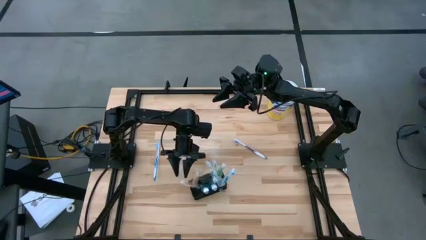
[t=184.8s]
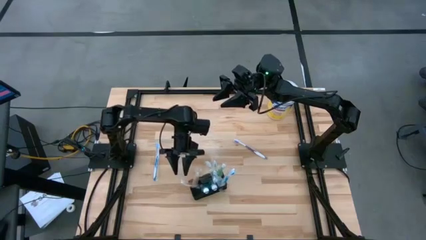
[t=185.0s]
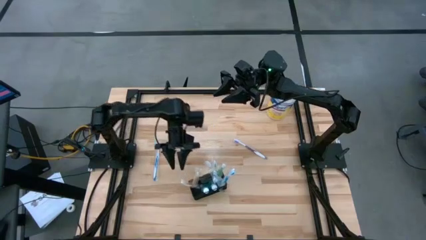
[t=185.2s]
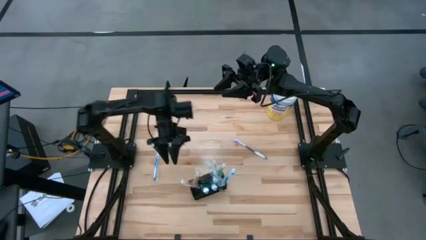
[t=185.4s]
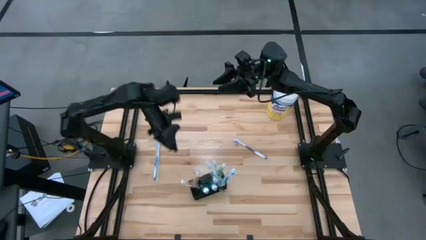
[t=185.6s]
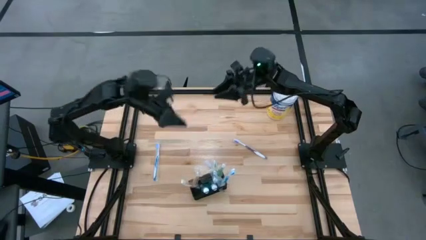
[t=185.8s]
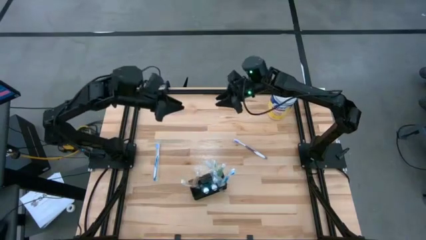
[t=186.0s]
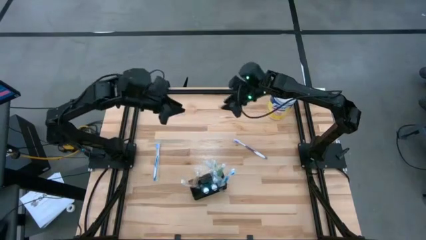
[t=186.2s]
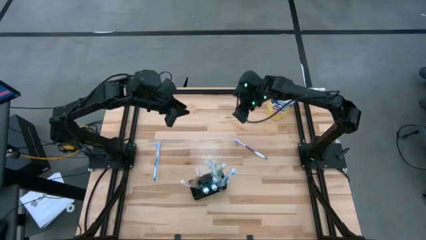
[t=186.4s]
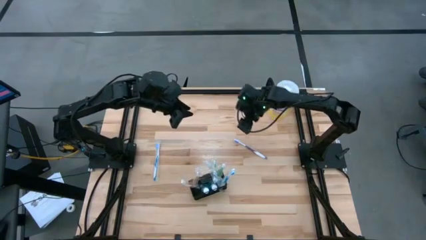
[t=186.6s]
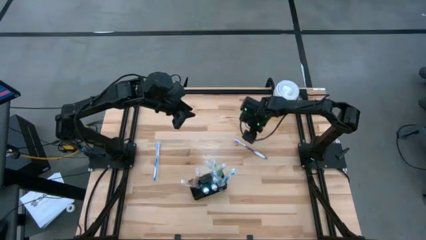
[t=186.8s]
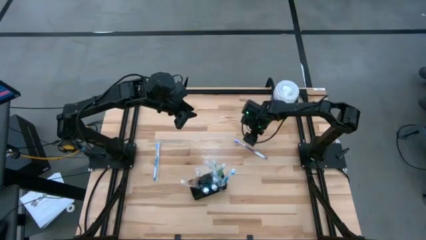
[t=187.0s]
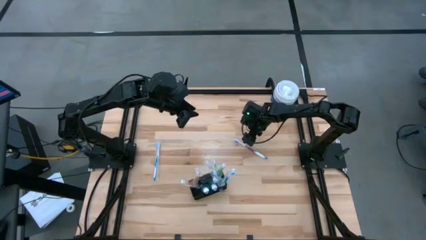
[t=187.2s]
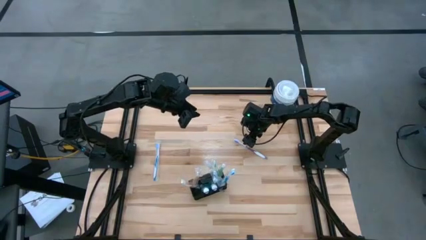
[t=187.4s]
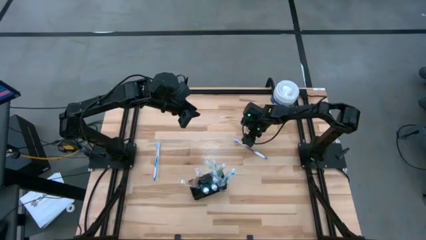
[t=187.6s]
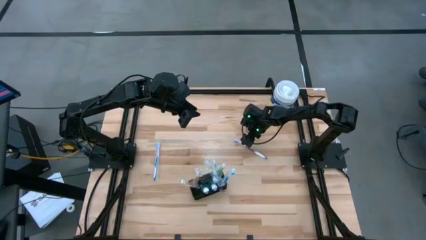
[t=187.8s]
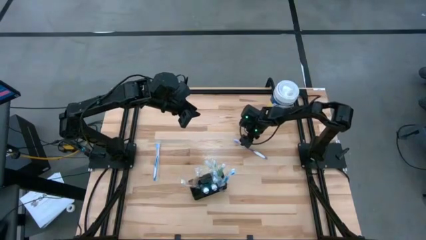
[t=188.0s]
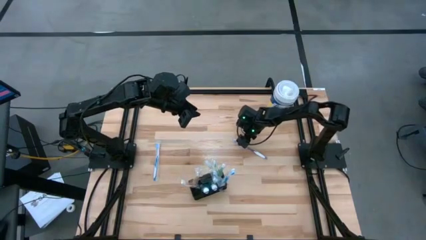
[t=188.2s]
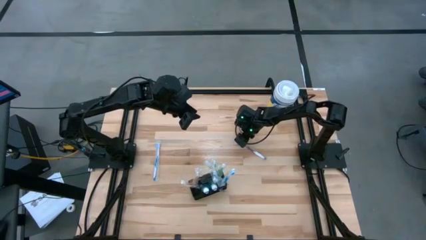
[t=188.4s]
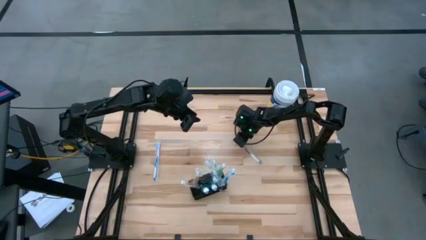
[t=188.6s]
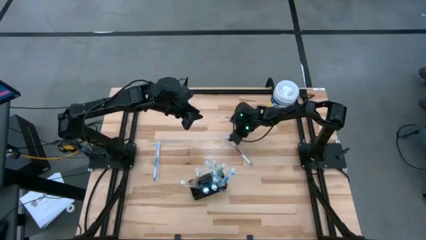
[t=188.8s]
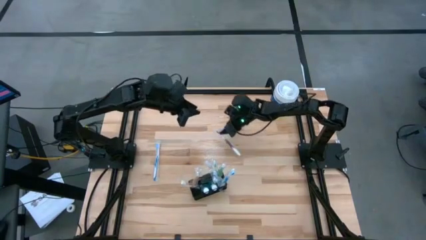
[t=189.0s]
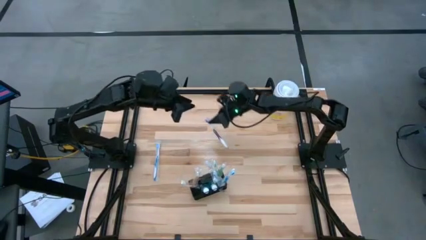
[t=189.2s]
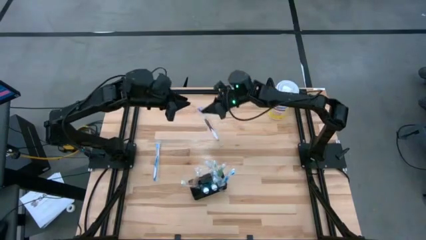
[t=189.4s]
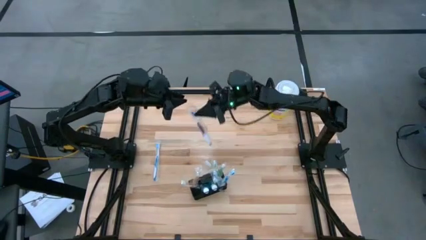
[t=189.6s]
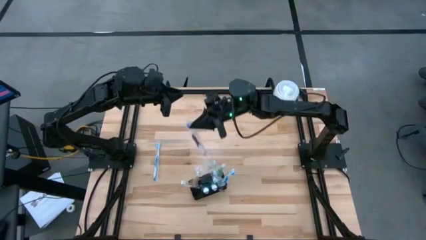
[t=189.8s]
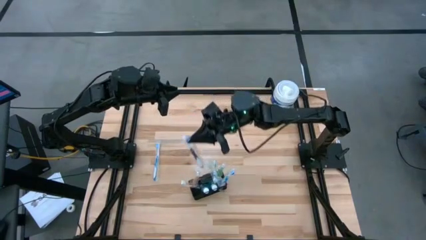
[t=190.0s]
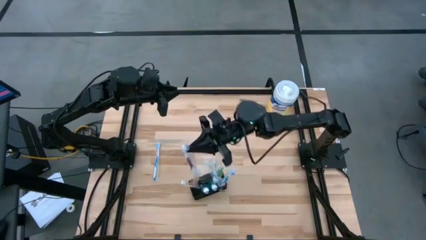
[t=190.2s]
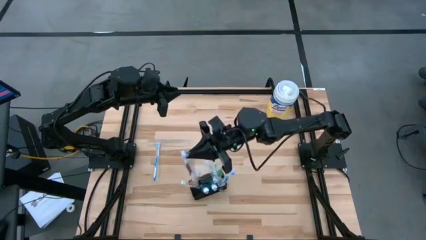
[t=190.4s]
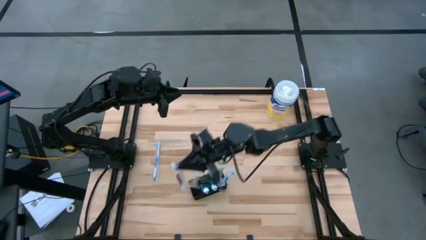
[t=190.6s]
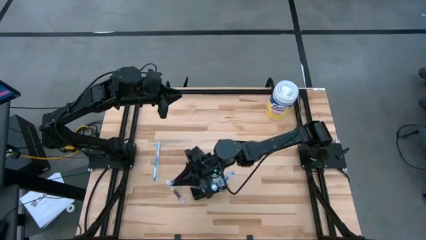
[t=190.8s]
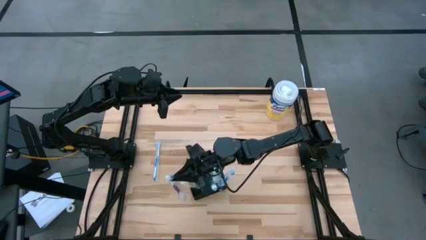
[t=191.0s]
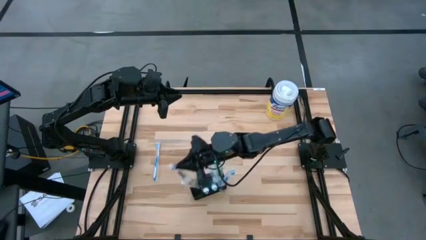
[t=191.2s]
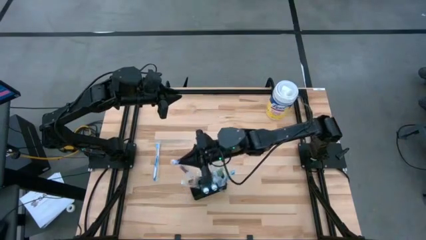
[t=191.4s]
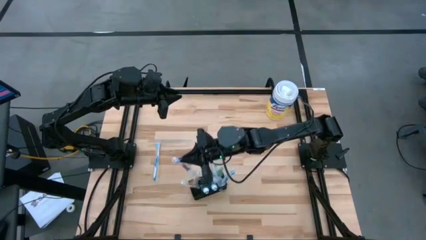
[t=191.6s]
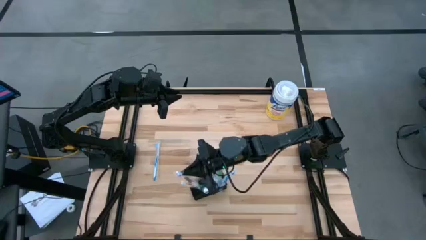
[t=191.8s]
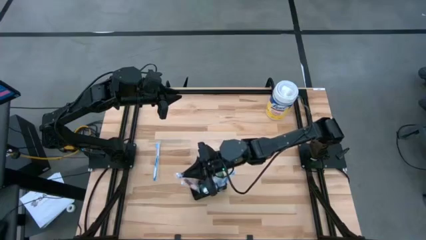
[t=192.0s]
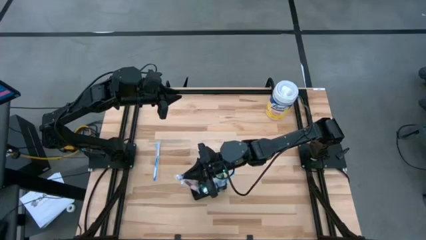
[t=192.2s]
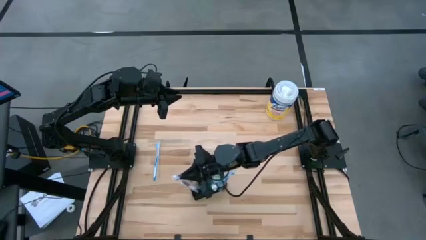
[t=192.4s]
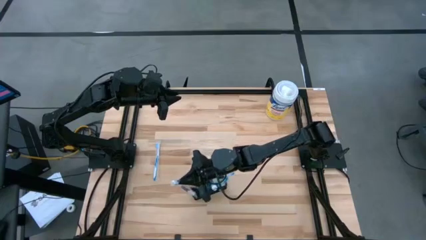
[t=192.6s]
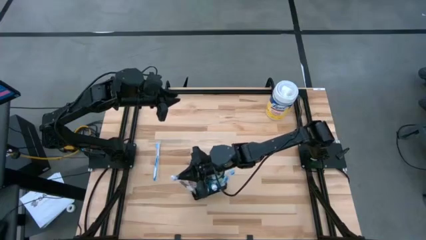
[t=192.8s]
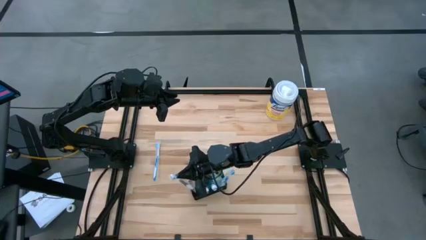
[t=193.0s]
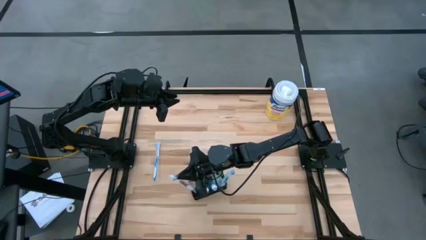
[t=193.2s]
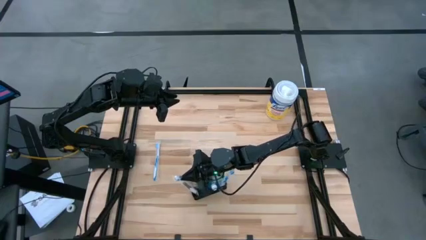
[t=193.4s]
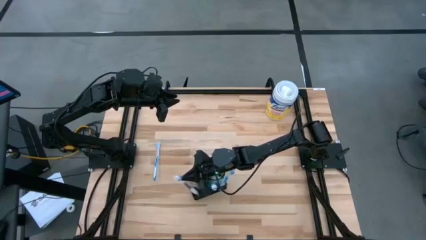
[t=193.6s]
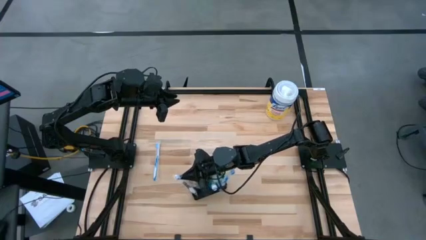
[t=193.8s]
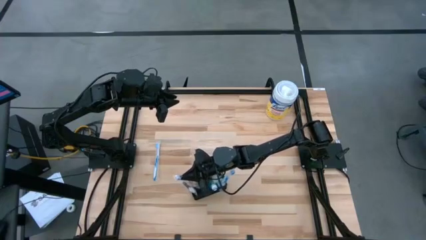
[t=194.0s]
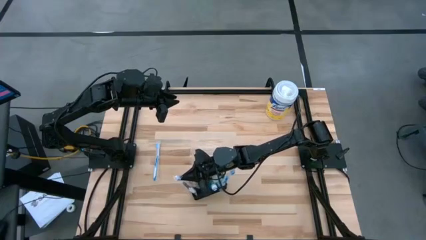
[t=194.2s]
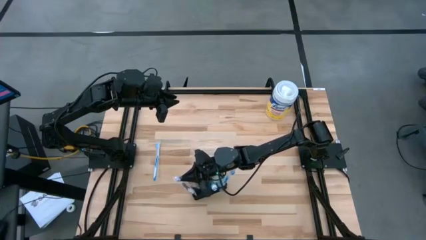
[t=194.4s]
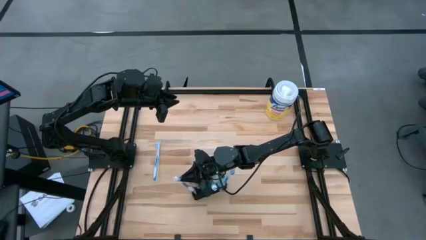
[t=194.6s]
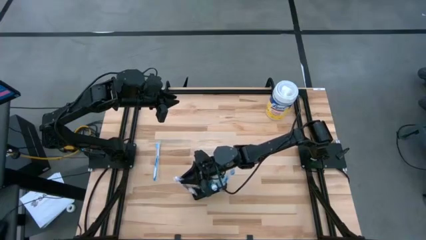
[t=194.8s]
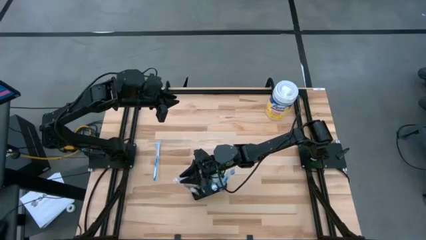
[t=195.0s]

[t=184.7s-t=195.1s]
Task: Pick & Place toothbrushing station
Put the violet toothbrush into the mesh organizer

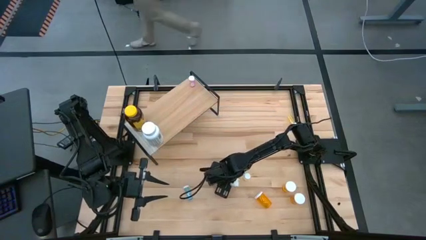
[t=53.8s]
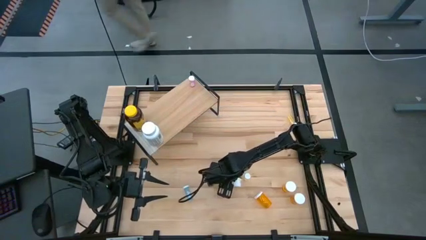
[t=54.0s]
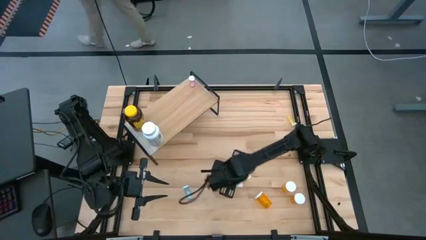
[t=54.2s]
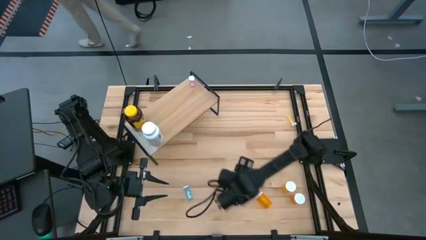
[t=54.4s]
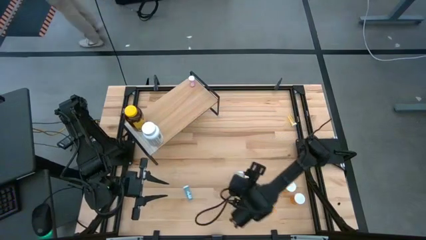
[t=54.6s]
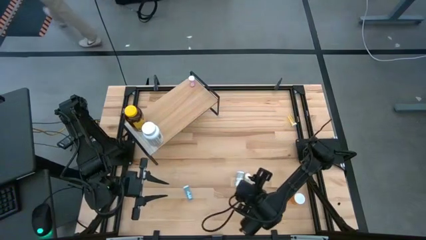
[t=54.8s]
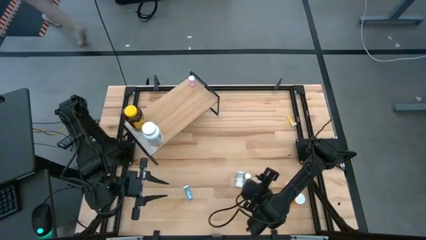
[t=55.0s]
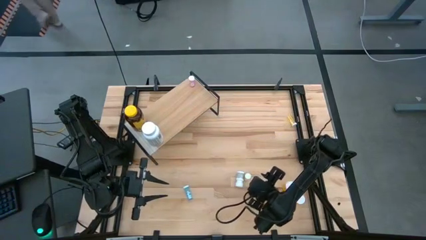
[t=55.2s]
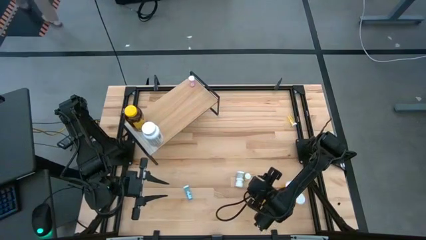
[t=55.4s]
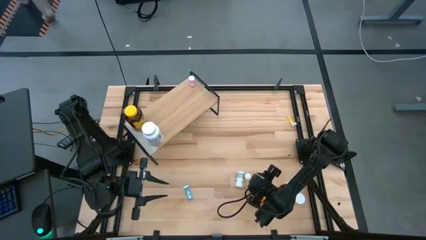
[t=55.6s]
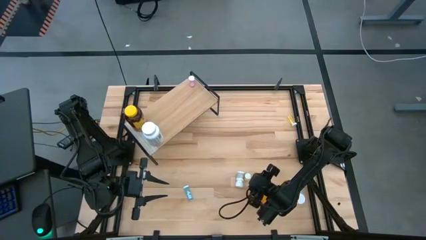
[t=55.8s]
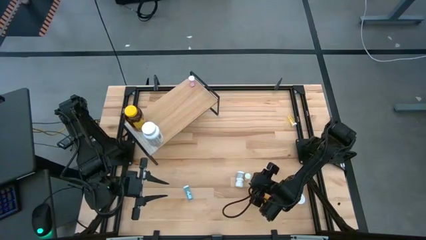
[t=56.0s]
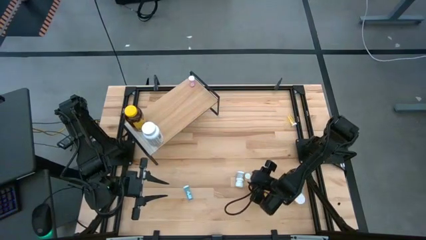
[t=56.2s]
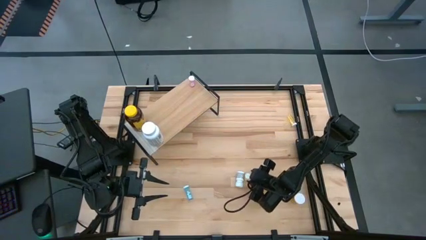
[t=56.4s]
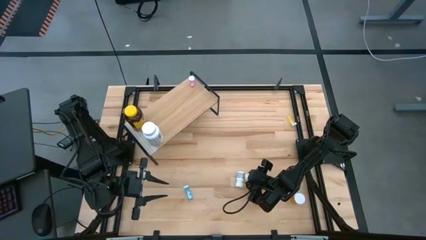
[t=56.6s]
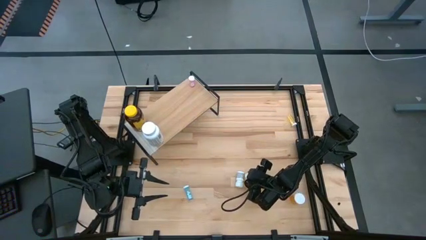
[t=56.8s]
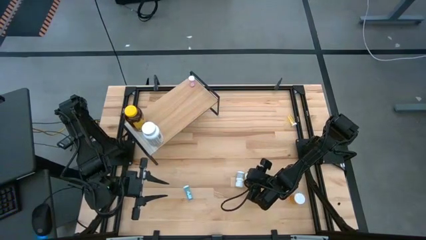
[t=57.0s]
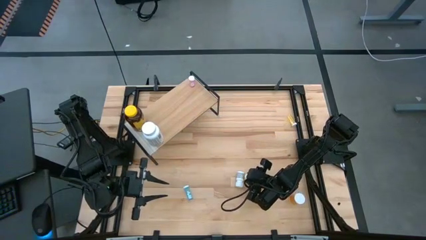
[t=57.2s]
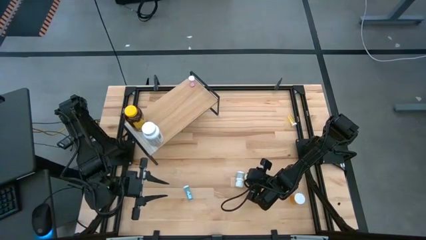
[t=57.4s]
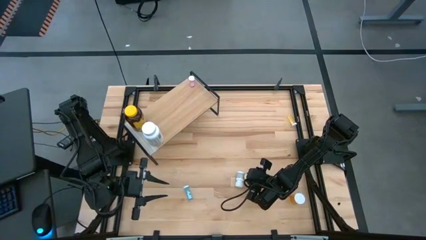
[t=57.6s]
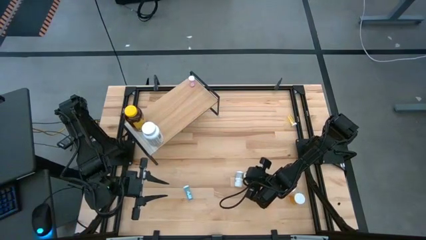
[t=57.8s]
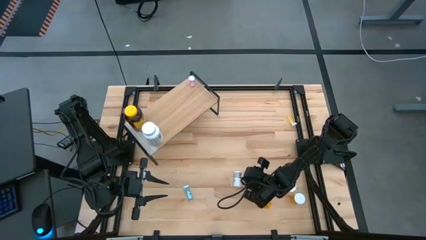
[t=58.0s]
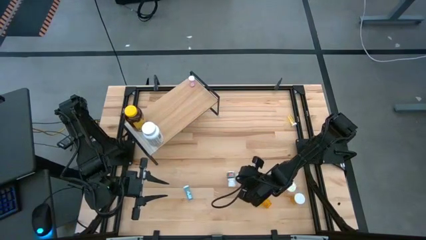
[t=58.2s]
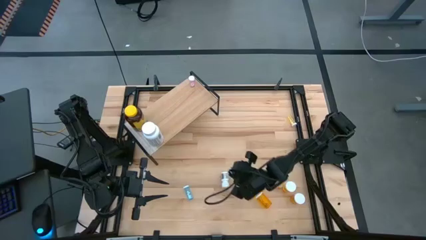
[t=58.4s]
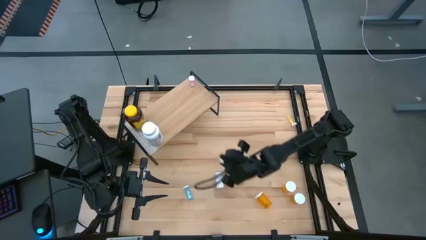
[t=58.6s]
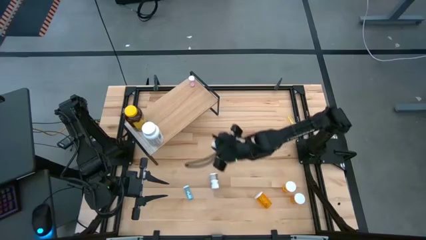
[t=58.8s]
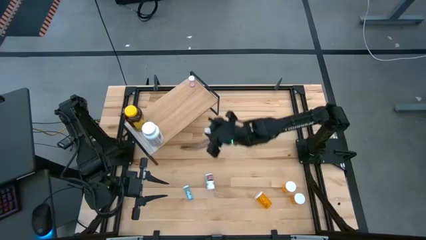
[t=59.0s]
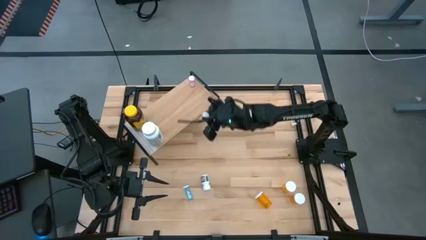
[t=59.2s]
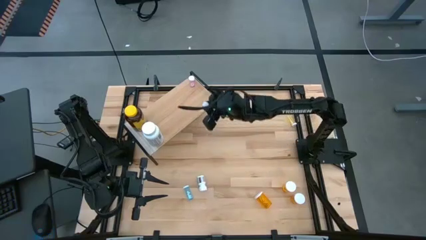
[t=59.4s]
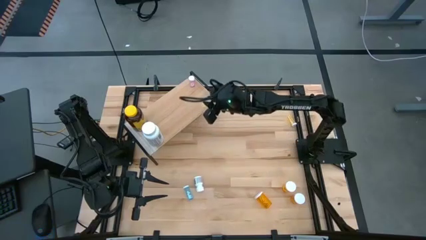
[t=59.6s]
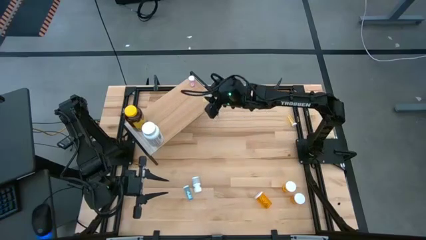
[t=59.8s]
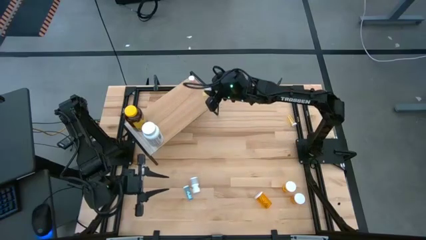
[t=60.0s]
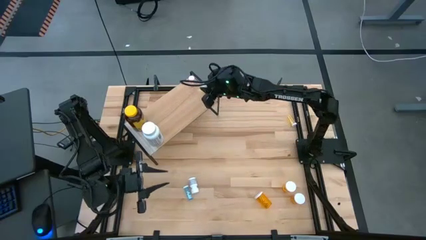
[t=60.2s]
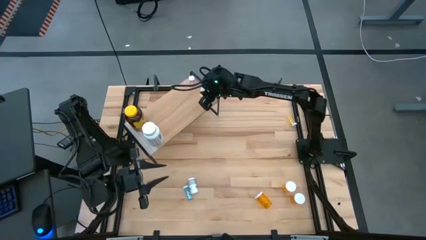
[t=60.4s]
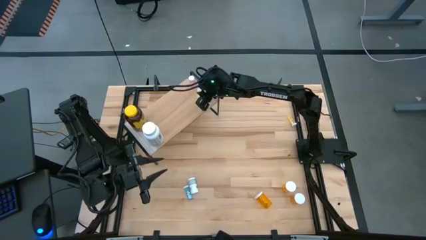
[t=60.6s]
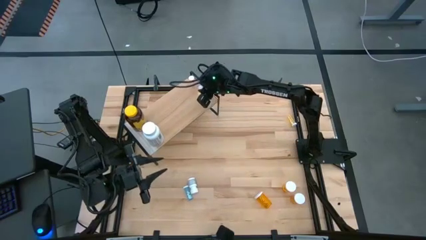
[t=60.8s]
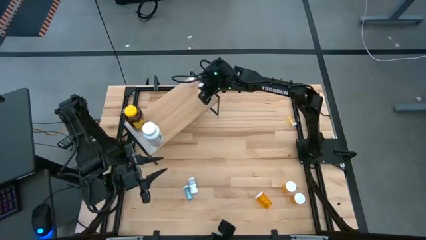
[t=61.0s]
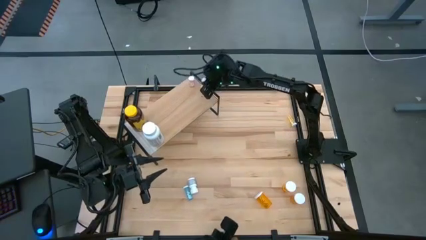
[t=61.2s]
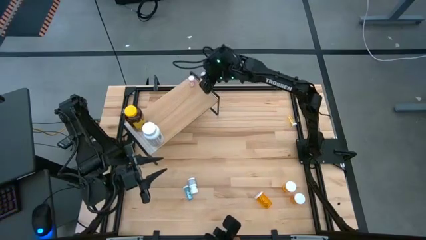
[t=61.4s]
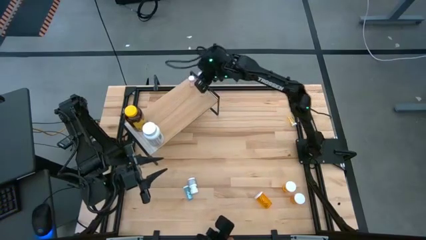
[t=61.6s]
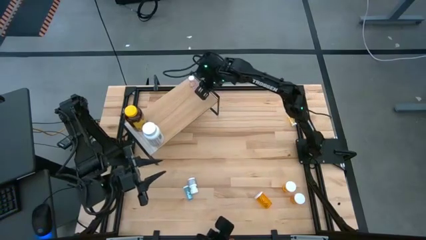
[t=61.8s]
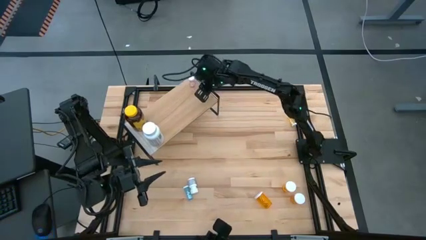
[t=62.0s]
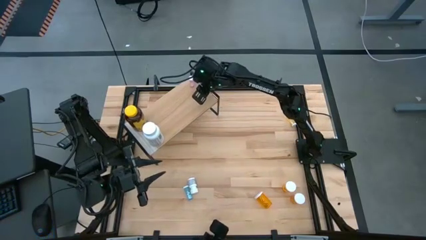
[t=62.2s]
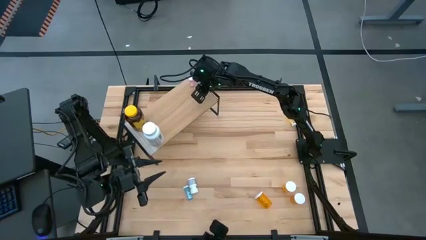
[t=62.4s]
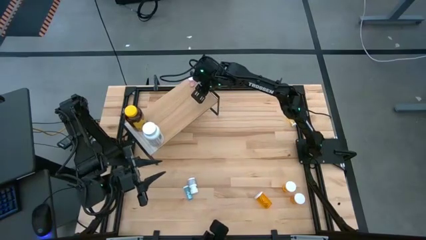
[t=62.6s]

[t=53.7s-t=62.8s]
Task: Pick and place medicine bottles onto shelf by color
Put the bottom small yellow pill bottle on the shelf
